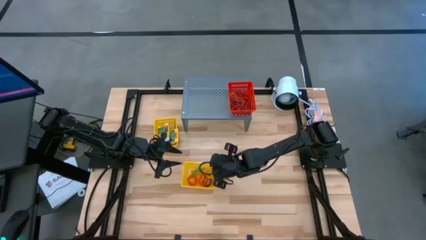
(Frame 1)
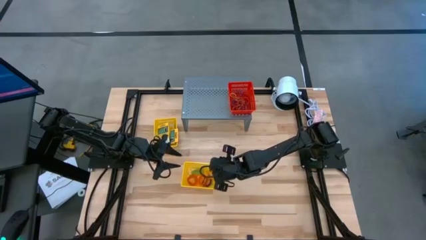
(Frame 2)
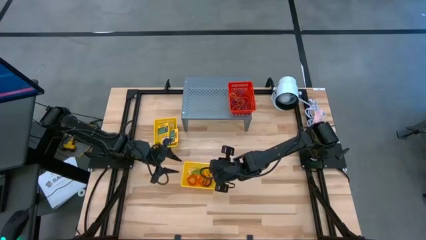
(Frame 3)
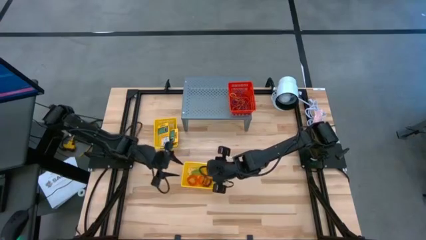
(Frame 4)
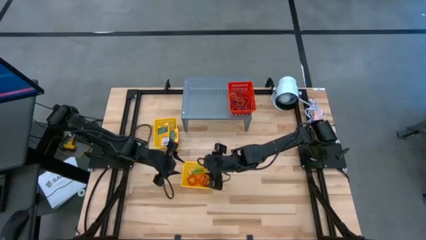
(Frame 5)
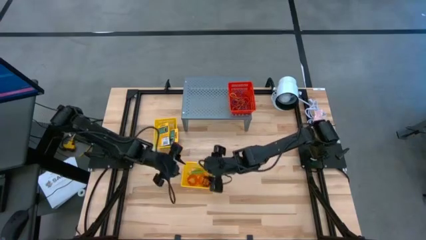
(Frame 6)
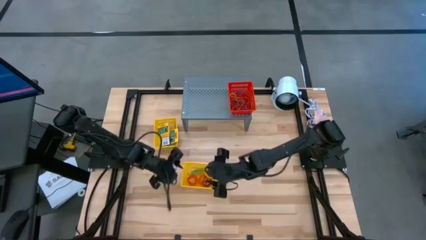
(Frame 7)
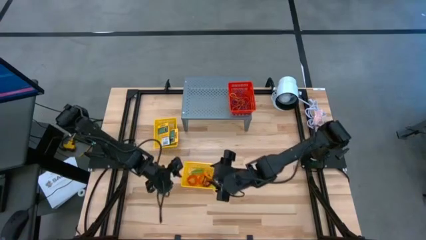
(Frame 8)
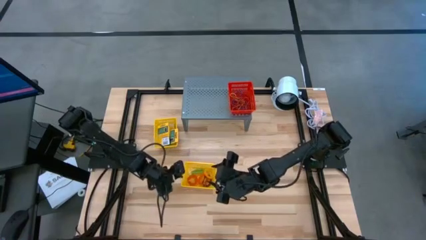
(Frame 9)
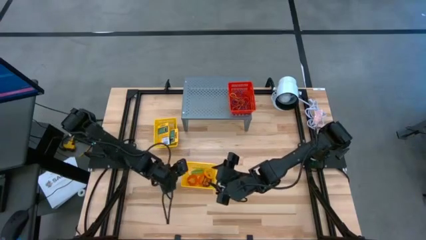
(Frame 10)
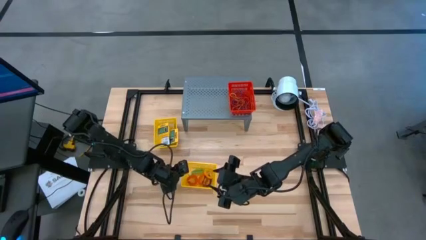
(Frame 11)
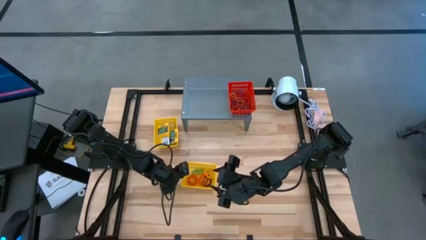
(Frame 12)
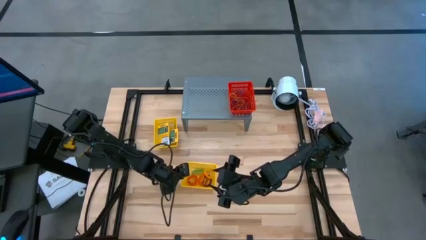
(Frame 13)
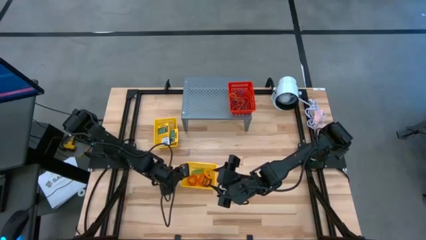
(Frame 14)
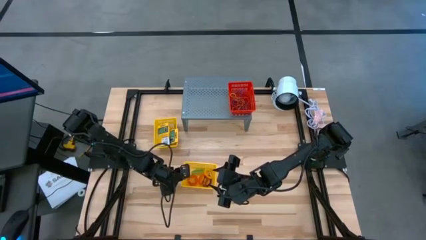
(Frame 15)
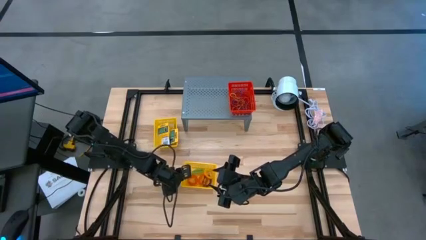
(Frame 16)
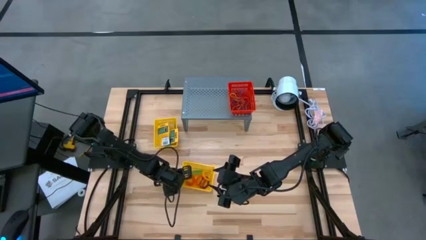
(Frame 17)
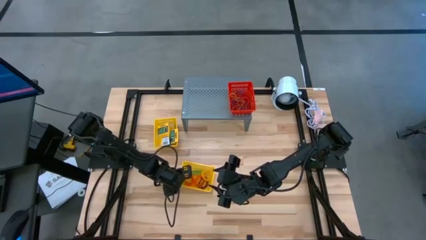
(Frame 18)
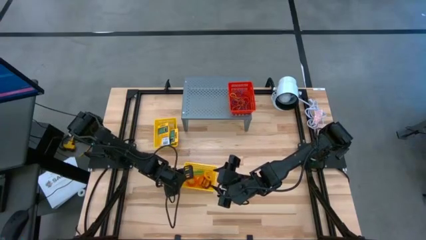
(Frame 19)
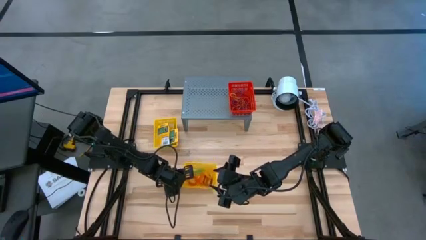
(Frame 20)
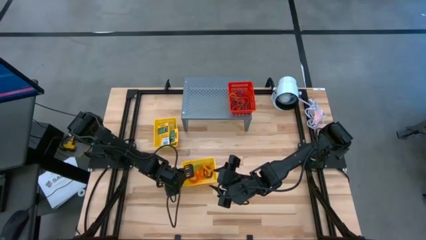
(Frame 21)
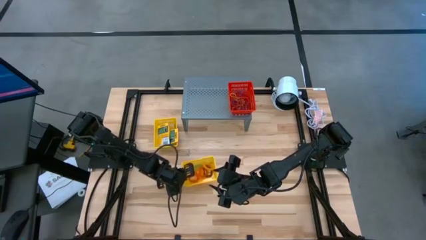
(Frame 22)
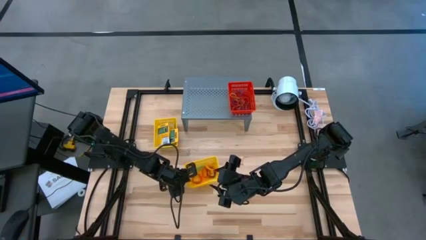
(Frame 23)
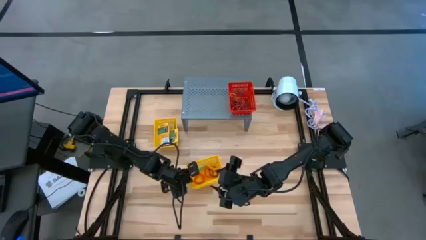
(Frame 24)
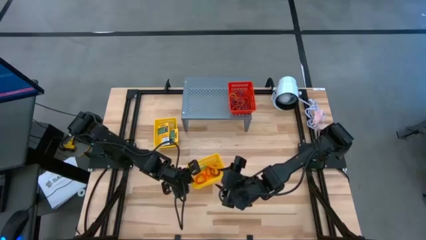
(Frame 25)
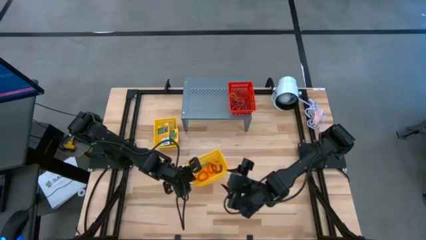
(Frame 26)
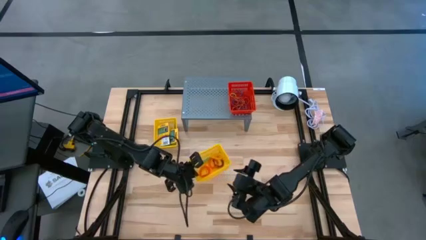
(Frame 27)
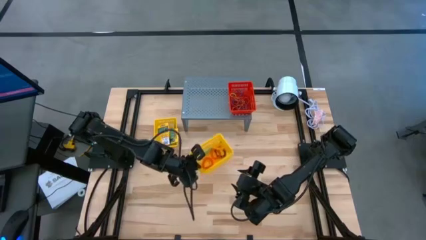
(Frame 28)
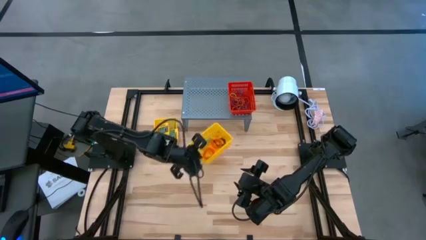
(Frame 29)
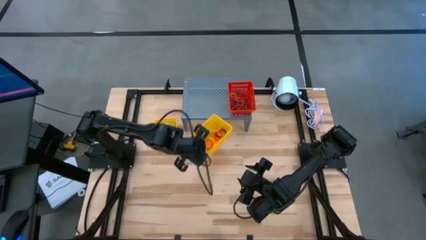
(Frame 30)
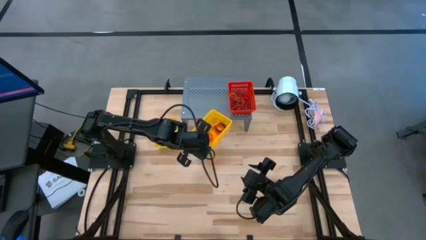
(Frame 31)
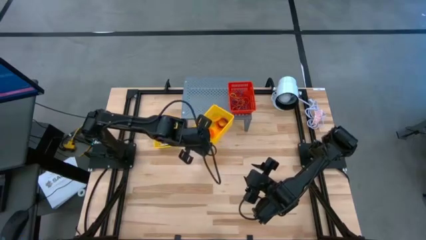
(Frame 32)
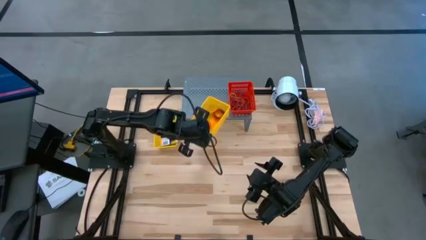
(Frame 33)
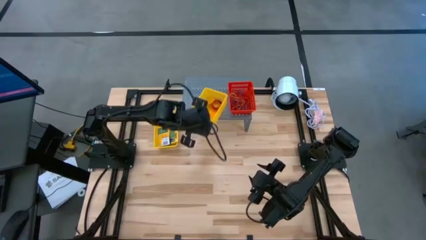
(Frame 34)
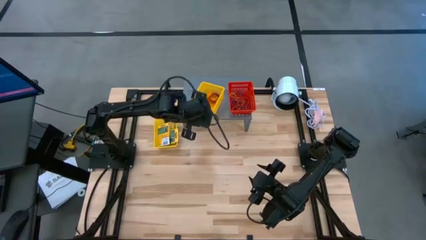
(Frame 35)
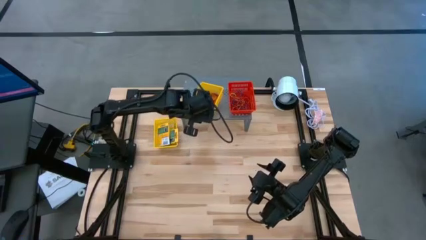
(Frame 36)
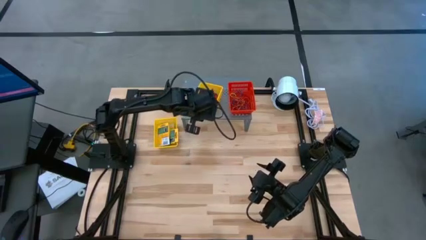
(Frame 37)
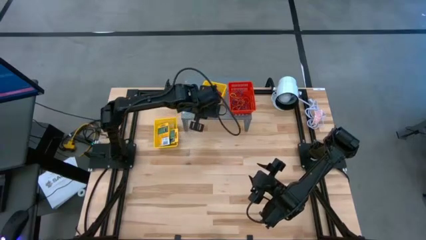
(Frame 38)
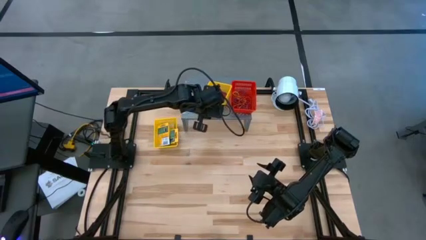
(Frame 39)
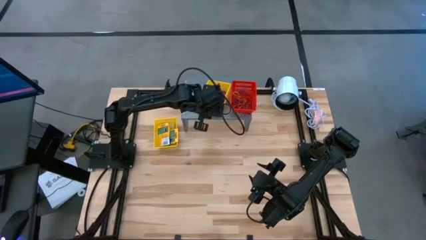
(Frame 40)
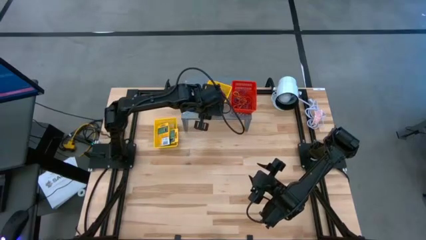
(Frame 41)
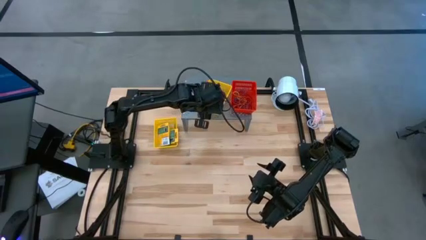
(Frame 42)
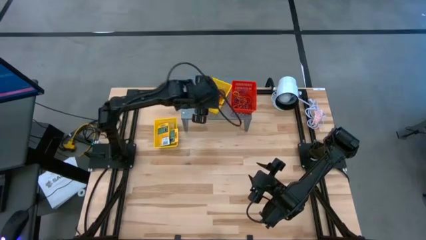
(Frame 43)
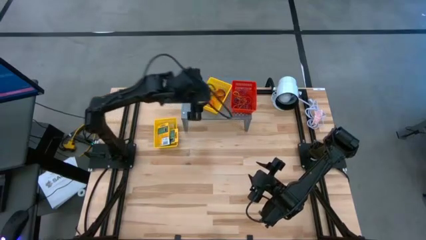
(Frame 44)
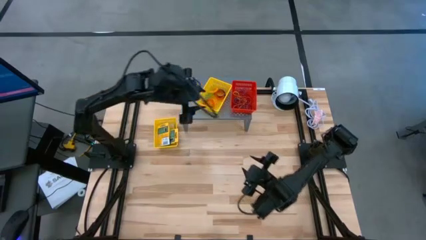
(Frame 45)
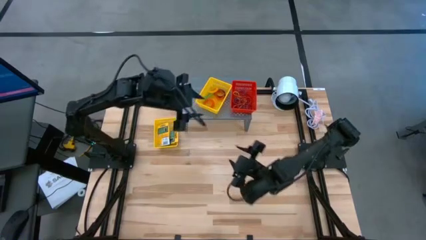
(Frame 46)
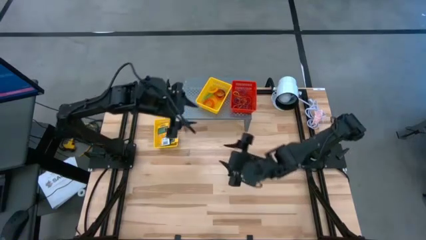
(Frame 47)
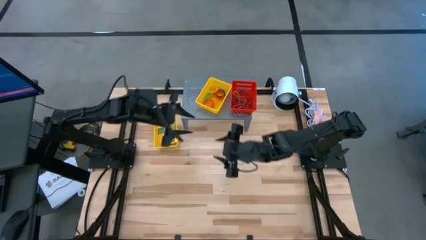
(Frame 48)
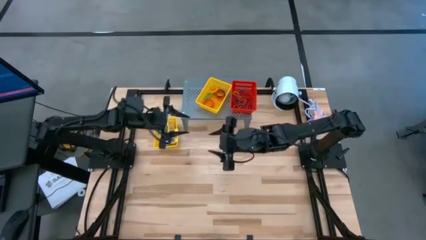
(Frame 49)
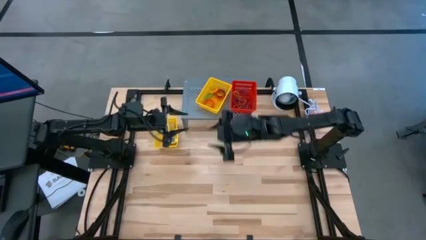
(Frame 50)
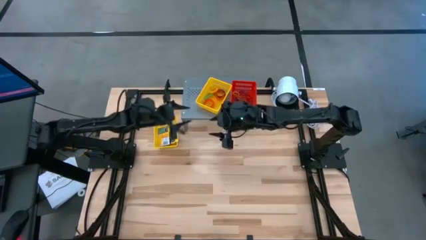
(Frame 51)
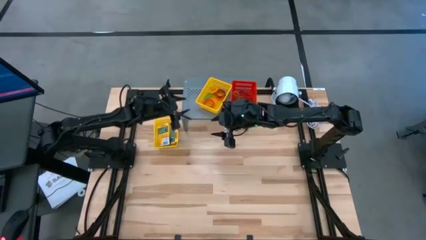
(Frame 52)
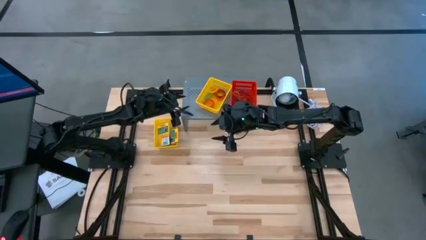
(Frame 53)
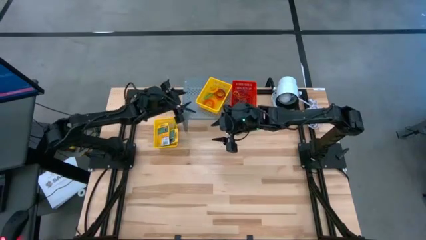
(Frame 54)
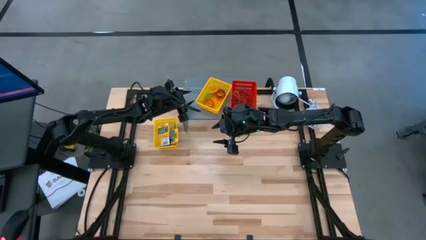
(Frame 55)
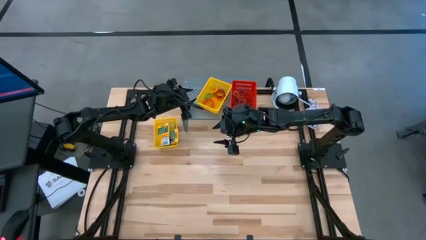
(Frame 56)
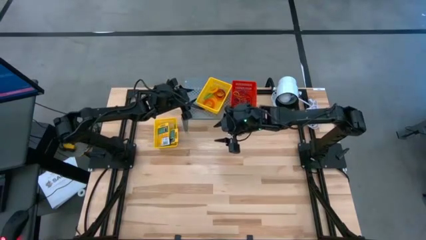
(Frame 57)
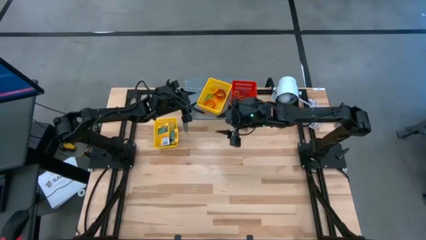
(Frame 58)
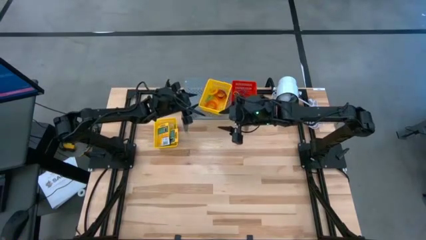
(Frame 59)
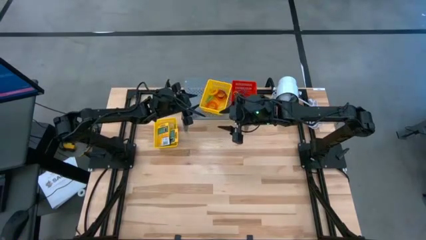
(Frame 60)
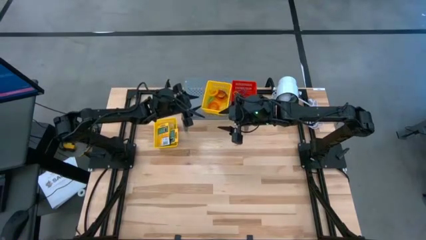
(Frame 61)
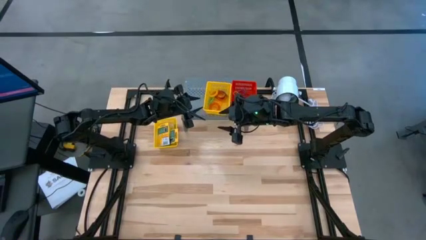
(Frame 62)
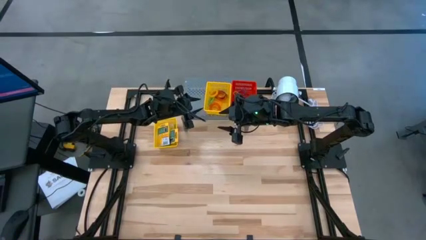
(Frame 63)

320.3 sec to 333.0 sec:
Task: Pick & Place Office Desk Supplies
Put the bottom yellow bin filled with spiral keychains on the shelf
